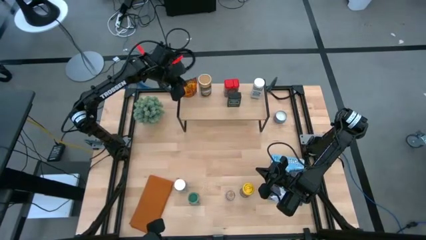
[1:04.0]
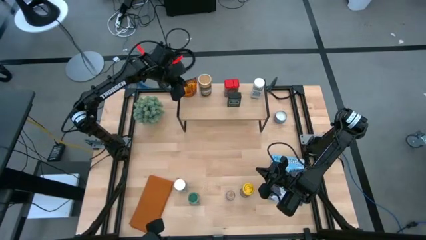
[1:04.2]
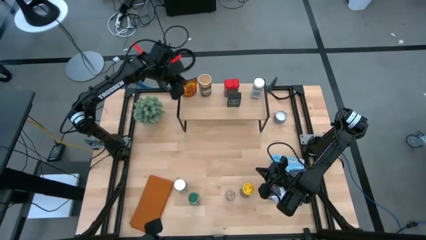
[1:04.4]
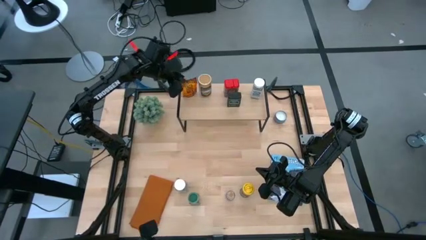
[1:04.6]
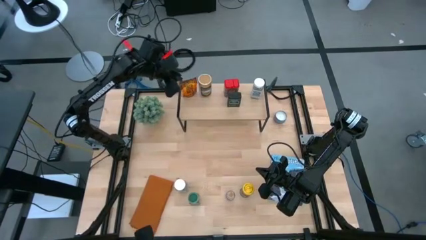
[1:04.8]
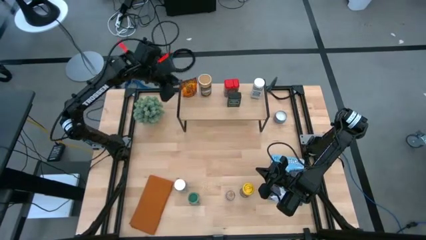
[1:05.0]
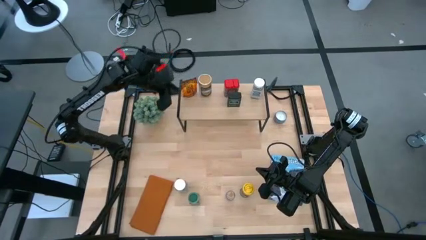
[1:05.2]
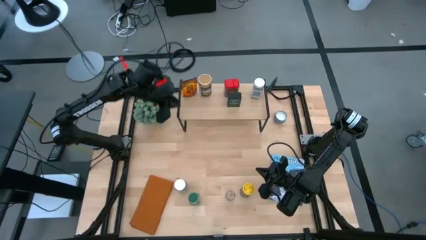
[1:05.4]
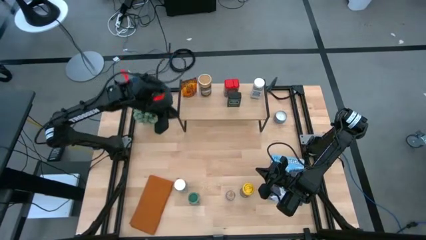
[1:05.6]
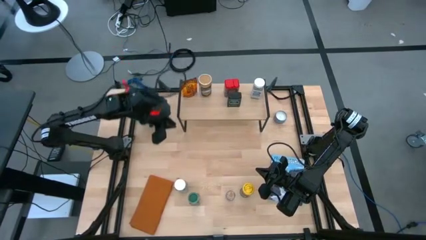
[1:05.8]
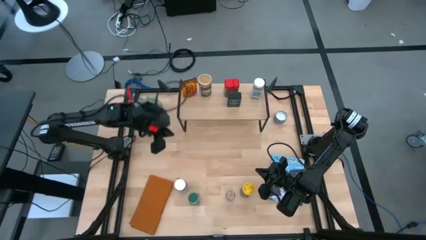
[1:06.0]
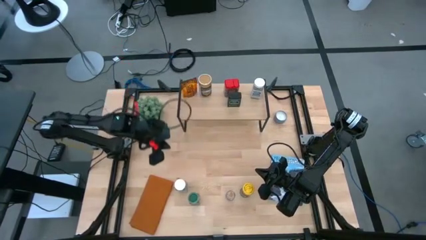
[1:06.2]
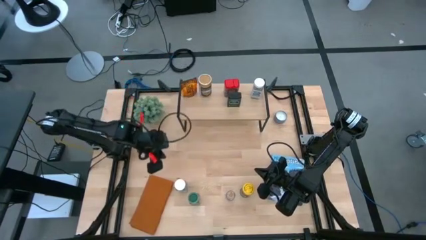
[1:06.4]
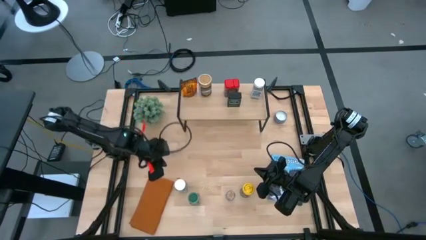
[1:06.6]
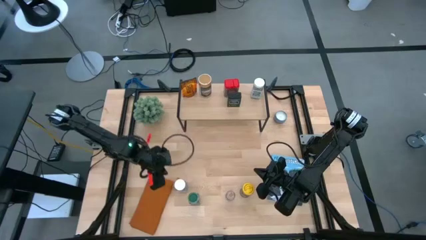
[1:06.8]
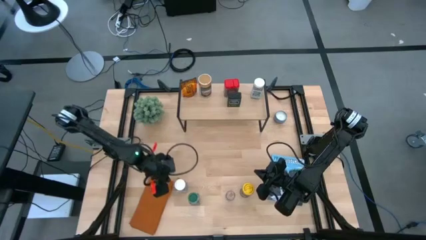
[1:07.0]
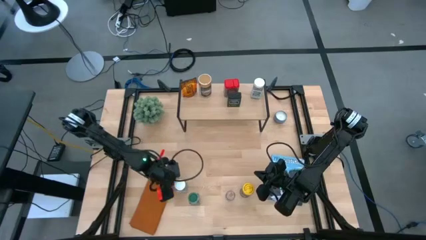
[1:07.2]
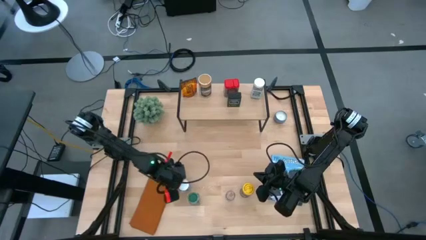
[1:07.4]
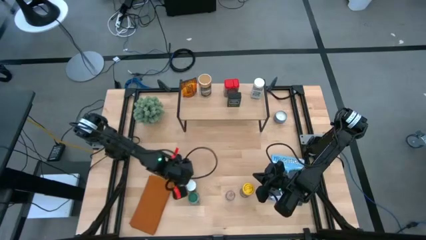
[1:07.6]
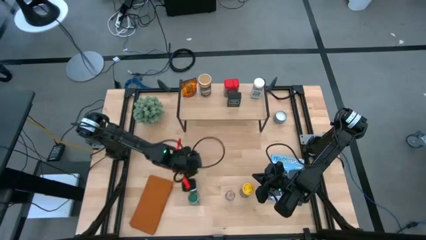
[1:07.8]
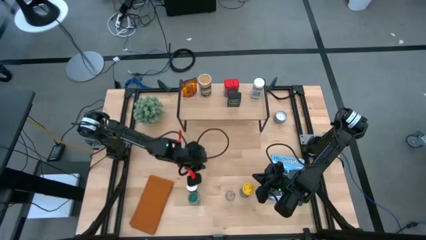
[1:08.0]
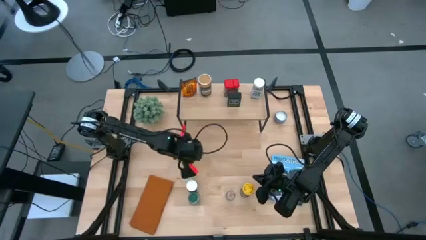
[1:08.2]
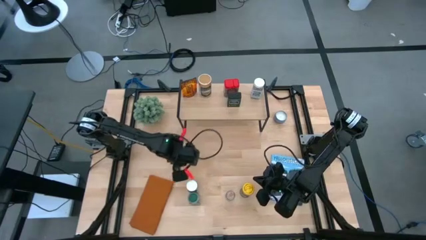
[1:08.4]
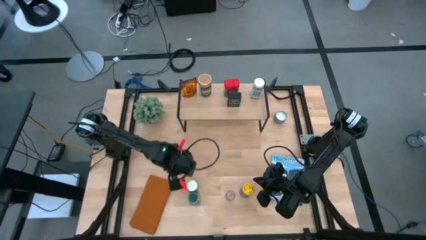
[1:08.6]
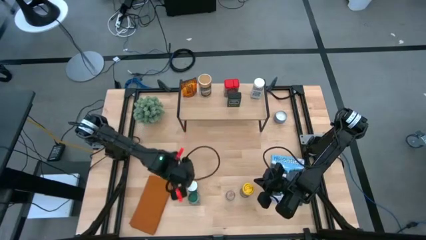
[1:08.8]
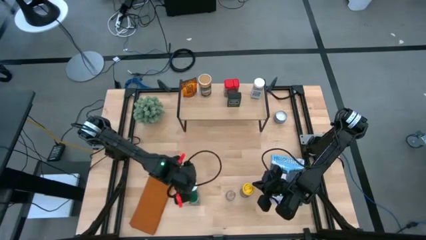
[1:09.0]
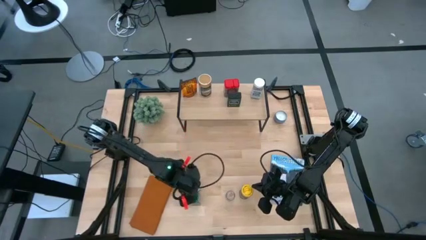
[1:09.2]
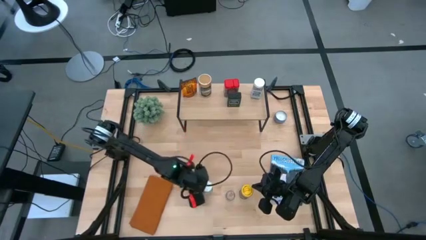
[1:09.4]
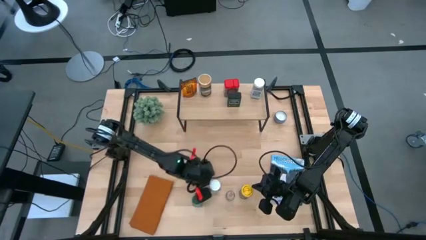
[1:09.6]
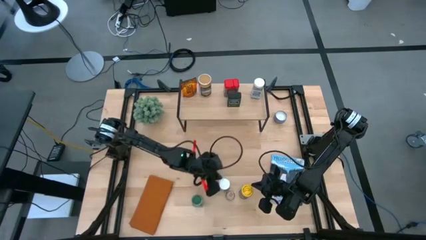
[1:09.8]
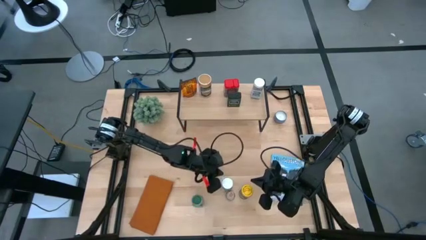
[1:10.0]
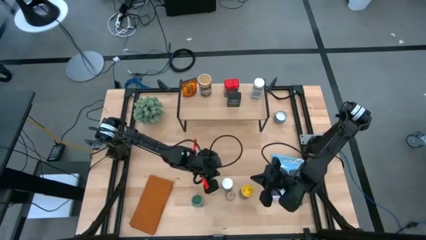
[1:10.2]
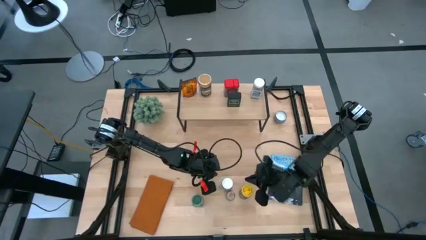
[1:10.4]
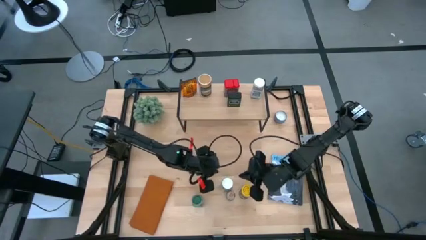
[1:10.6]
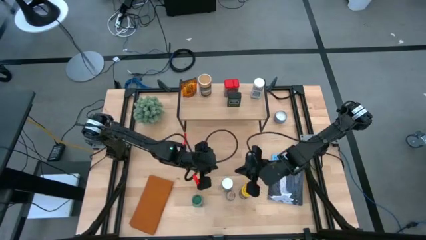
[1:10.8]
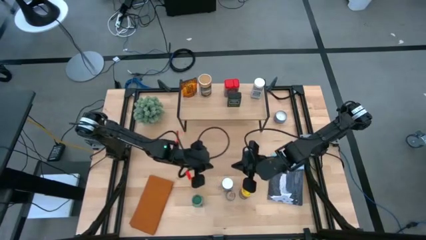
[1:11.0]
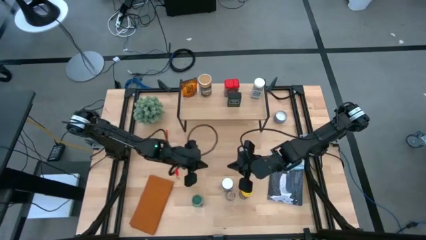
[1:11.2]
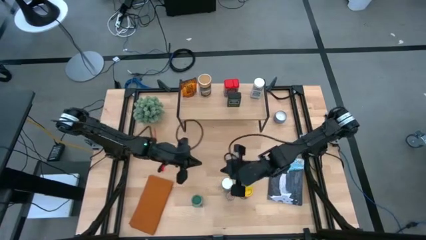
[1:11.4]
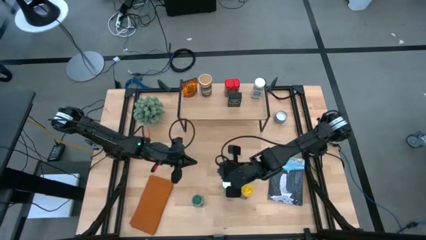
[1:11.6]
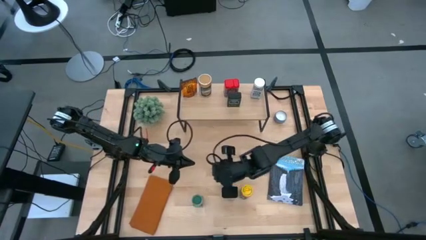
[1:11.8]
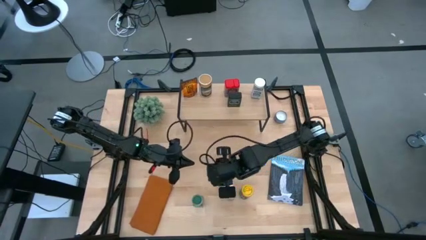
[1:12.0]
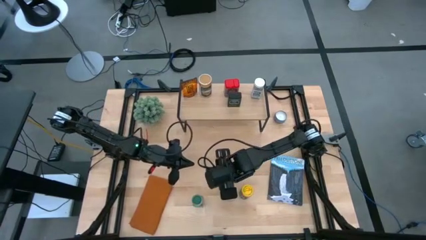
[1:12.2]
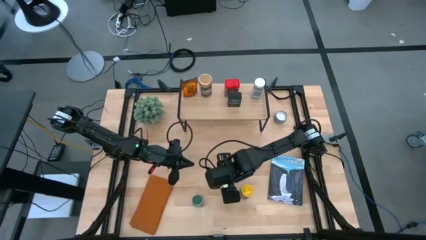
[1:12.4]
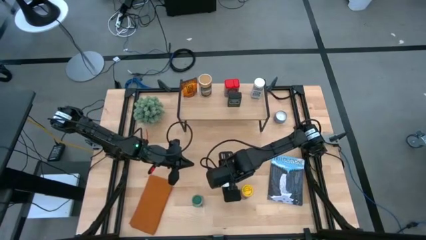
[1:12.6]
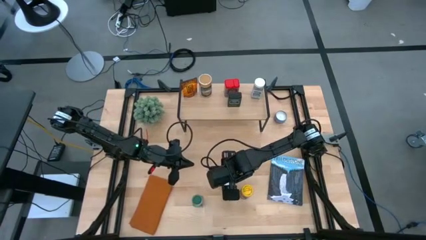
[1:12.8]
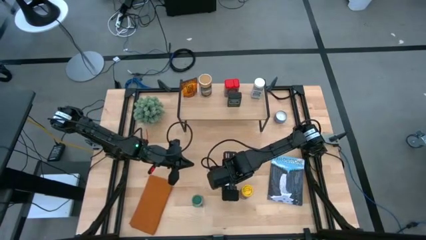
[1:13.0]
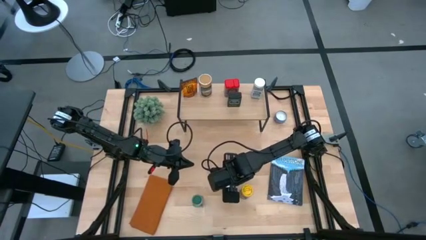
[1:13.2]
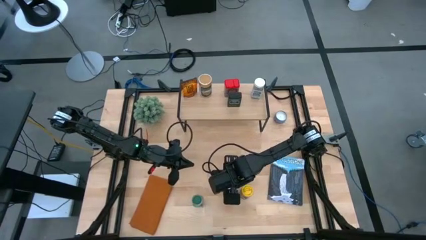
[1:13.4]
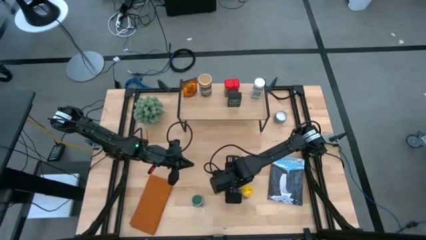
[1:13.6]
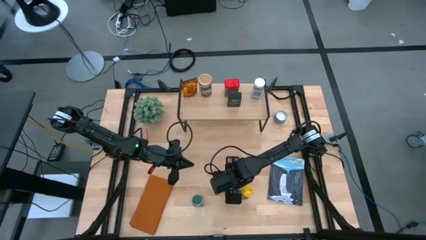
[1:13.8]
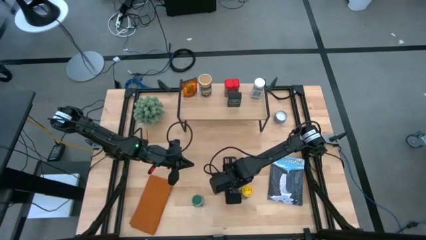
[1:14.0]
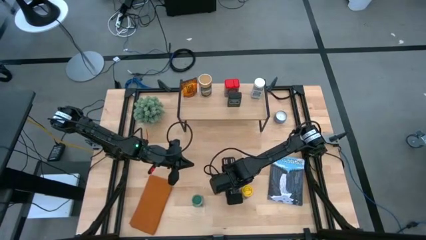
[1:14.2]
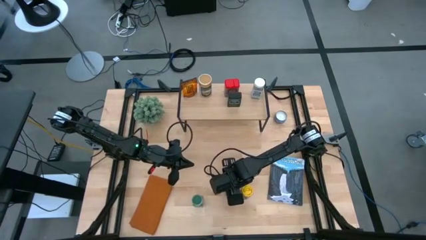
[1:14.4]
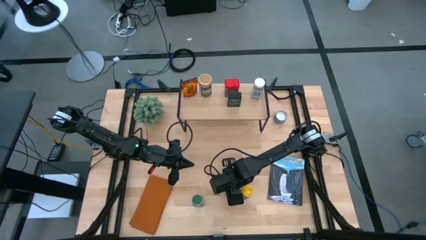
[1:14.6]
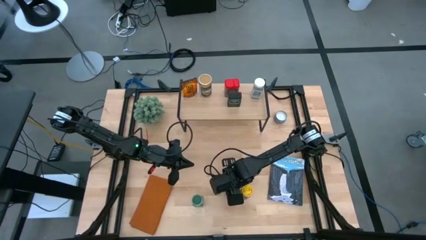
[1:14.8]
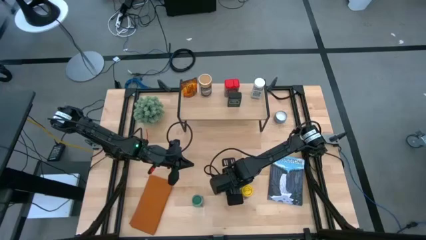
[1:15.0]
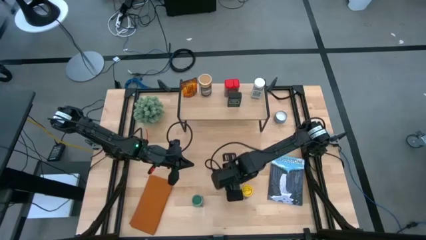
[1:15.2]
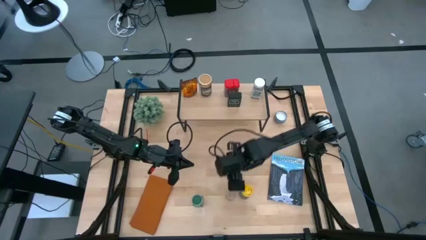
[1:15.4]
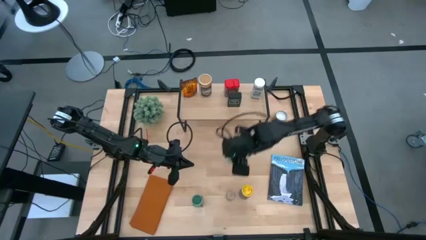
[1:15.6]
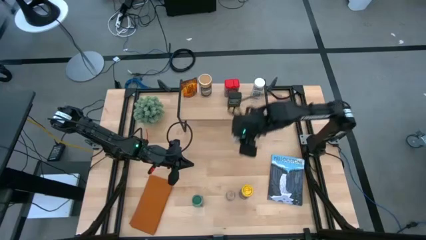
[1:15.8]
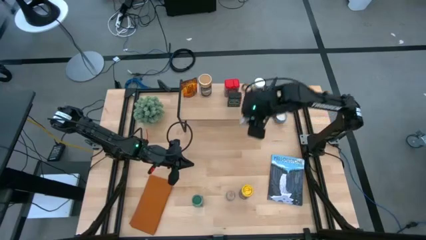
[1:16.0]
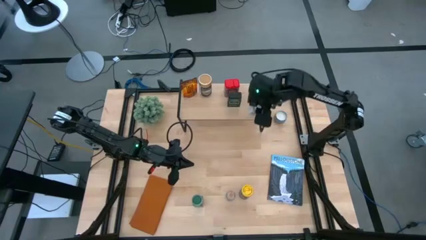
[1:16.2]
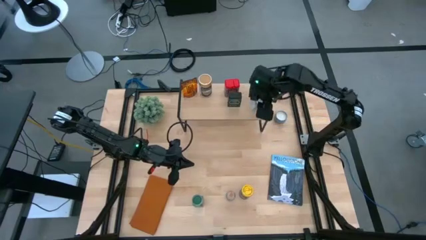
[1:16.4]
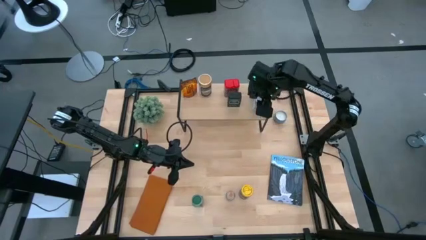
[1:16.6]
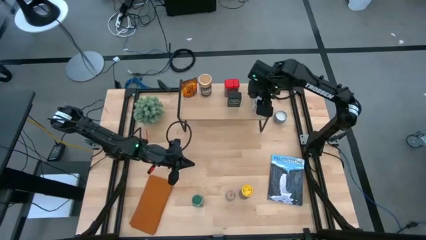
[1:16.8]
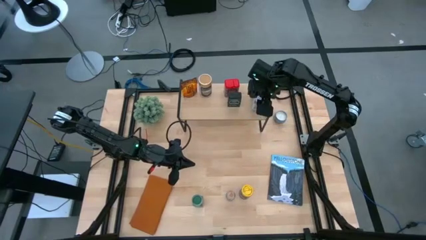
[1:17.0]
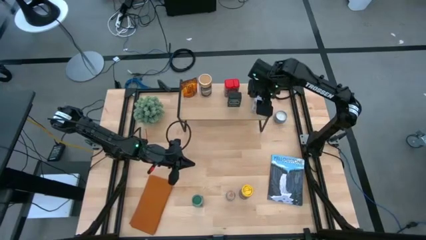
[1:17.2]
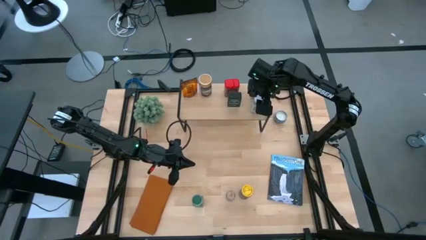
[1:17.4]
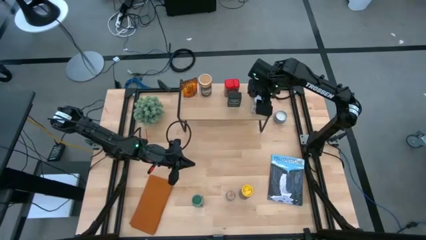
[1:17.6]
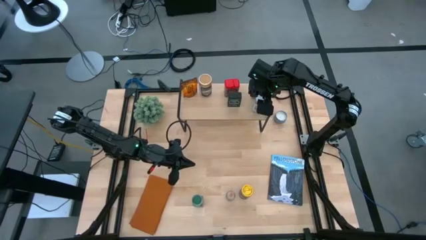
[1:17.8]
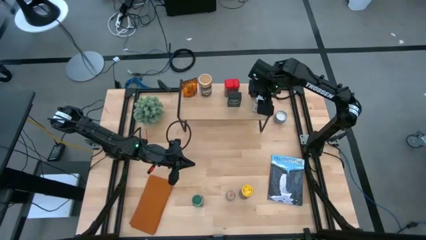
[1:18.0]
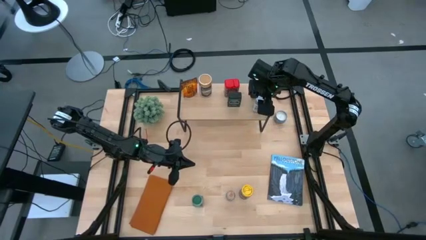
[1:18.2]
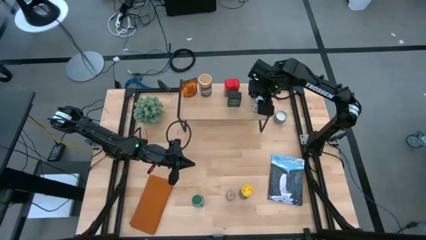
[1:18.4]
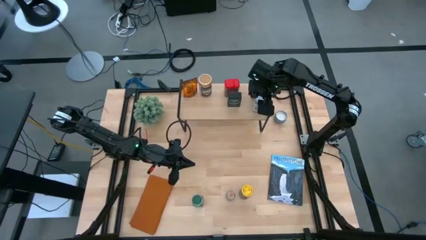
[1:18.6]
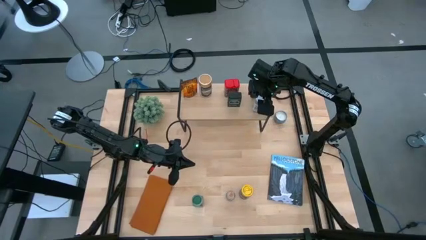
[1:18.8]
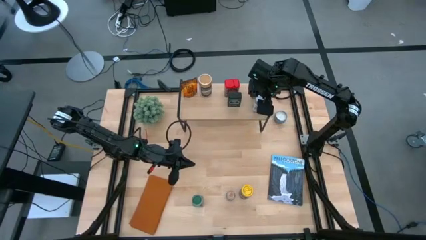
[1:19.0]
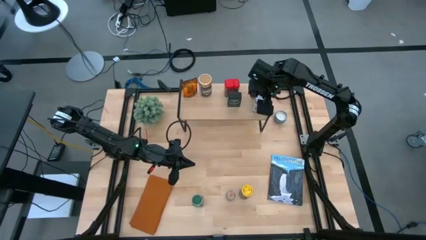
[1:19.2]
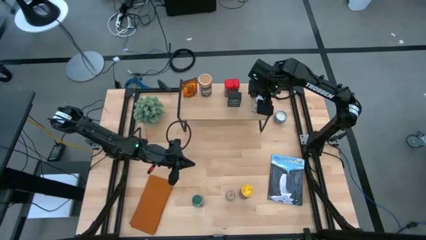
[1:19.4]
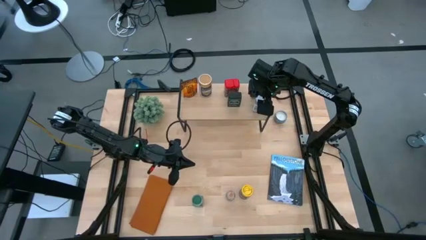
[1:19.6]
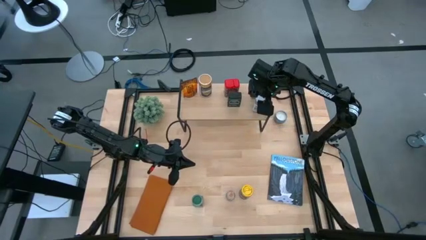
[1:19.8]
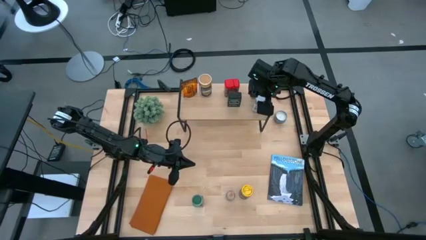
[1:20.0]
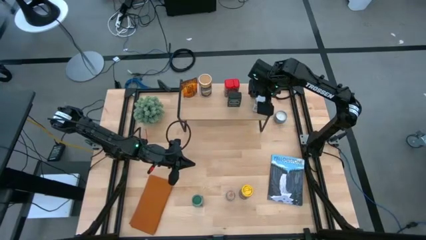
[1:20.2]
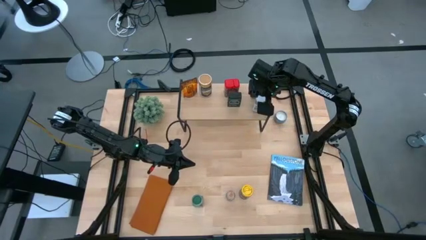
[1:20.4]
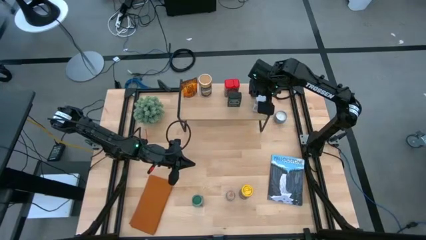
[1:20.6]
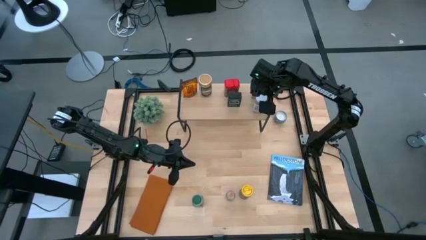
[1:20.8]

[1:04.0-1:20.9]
Task: Shelf spices
Put the white seasoning bottle on the shelf
